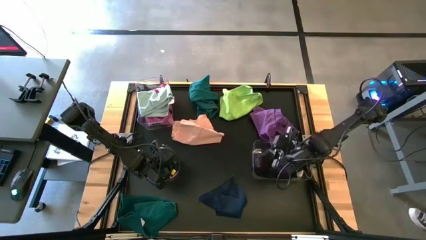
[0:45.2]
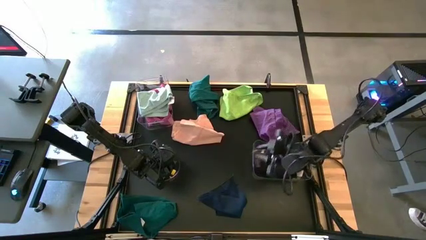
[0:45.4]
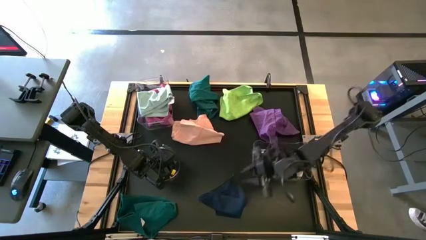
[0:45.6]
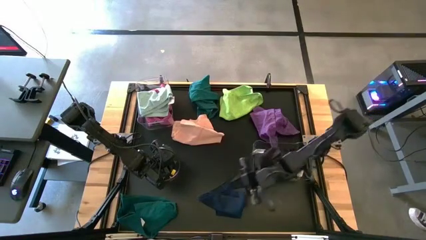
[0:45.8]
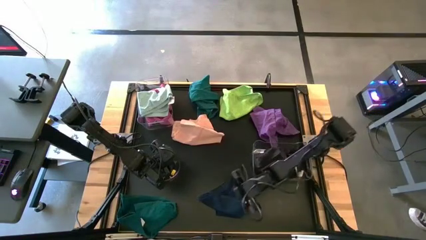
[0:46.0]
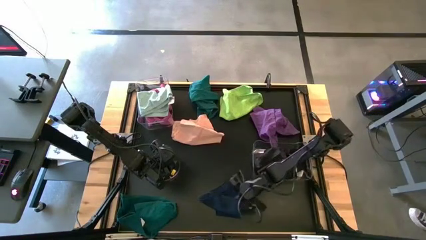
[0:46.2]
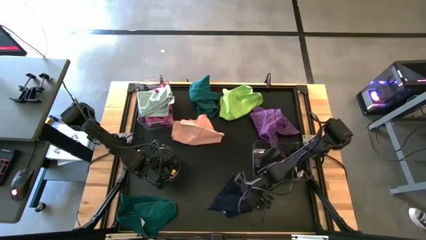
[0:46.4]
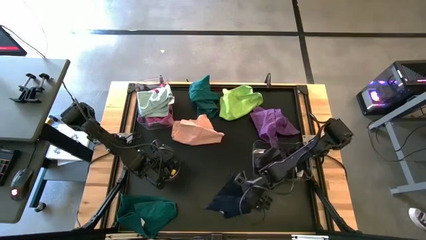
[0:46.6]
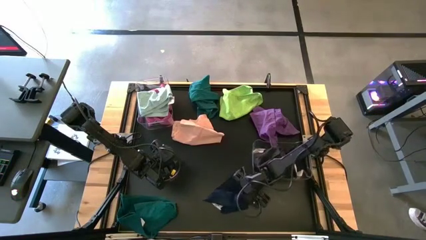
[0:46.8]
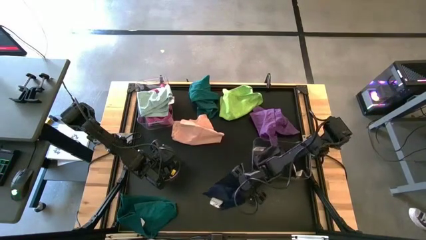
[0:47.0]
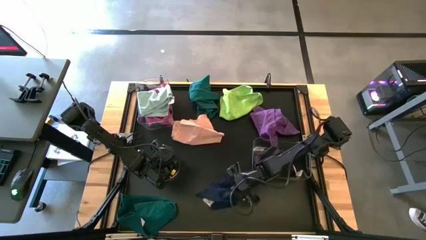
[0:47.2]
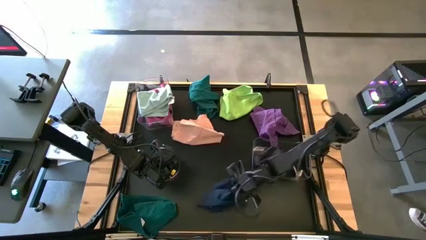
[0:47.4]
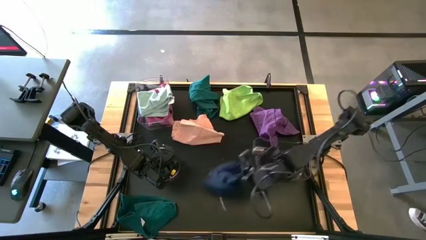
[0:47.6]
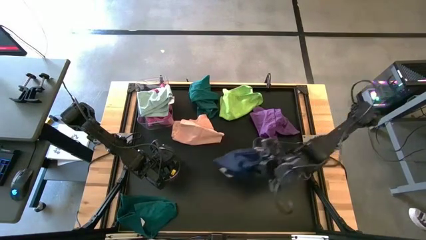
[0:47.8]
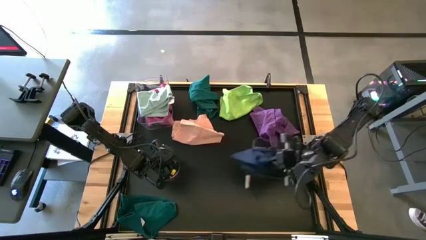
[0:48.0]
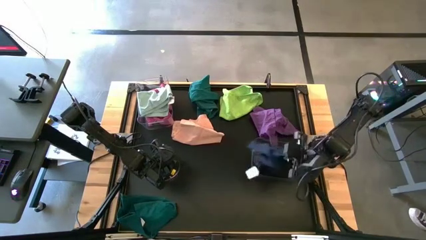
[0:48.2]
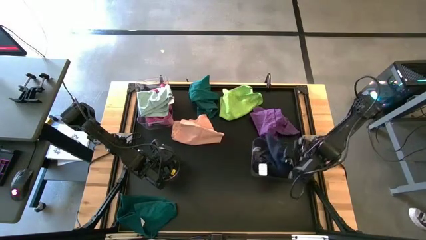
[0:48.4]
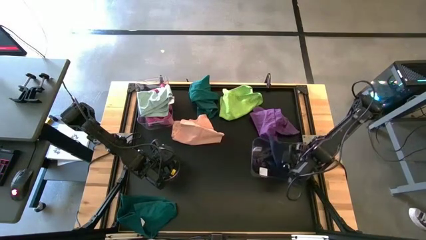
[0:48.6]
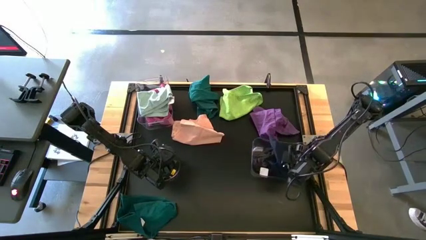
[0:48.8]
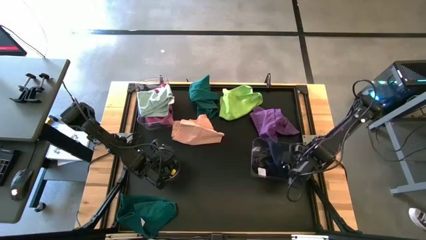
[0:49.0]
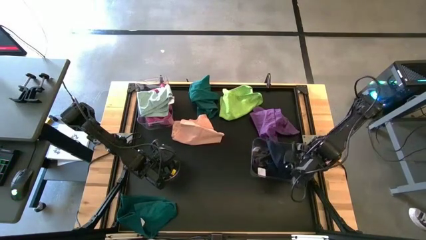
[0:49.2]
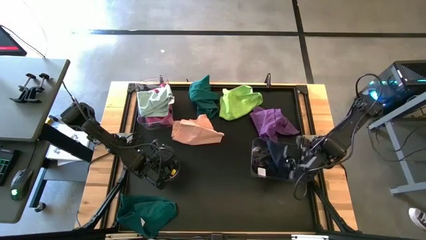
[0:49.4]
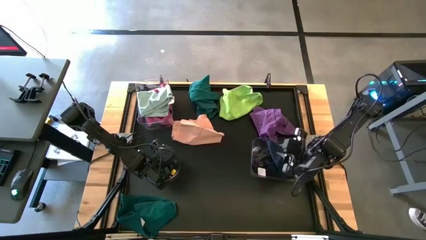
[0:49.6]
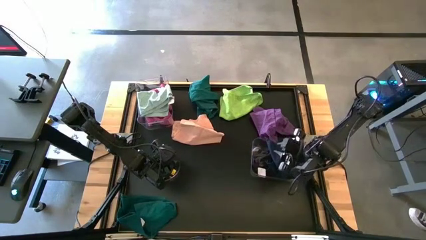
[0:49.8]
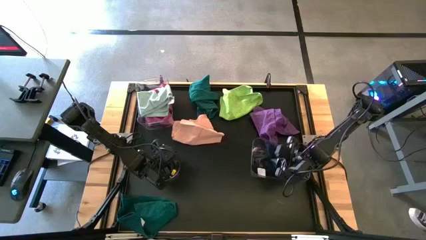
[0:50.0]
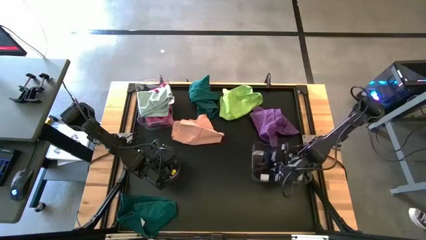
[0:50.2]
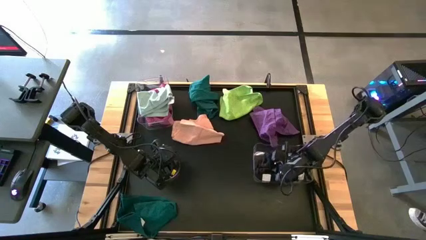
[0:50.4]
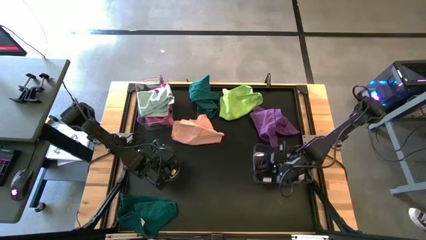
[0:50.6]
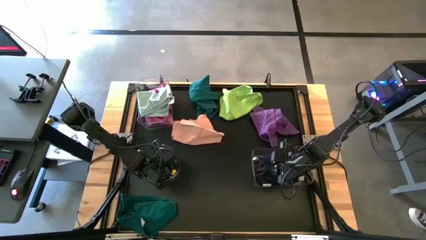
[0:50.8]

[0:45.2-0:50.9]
Task: Sort towels by color in basket
Put the blue towel into the right transparent bin

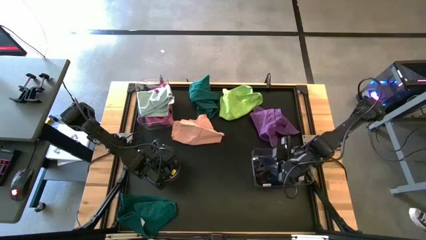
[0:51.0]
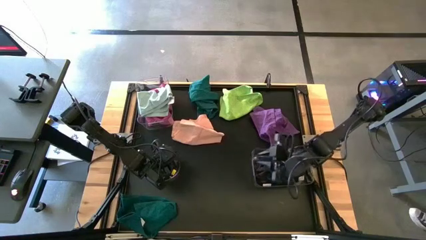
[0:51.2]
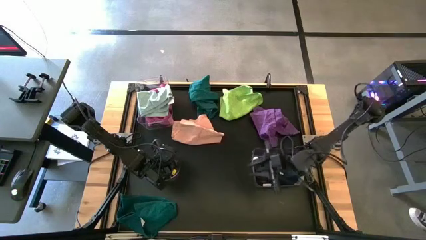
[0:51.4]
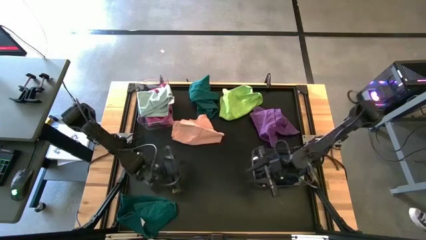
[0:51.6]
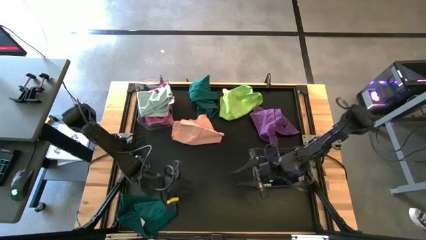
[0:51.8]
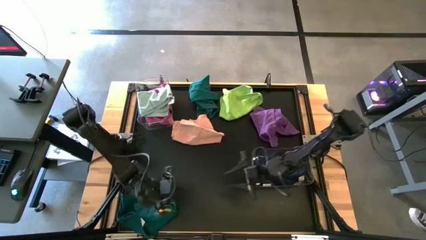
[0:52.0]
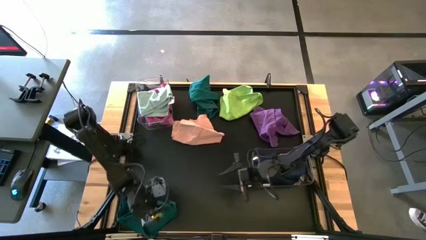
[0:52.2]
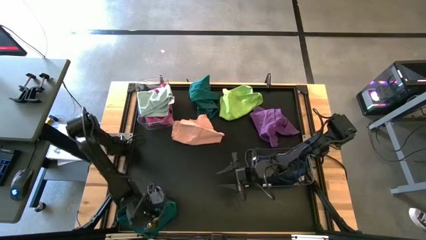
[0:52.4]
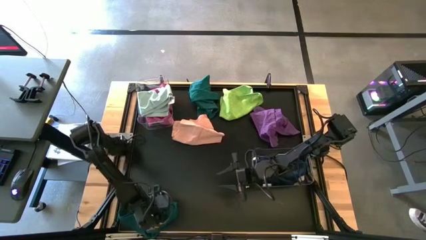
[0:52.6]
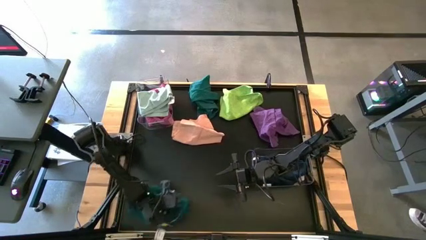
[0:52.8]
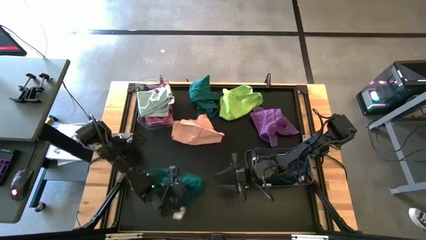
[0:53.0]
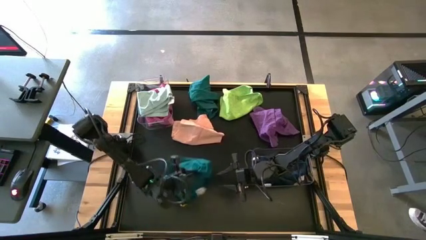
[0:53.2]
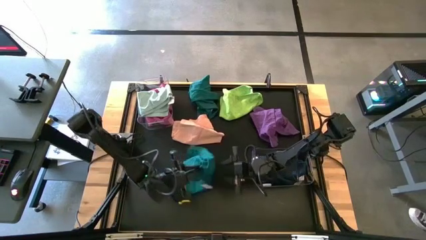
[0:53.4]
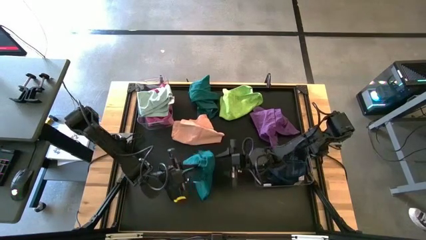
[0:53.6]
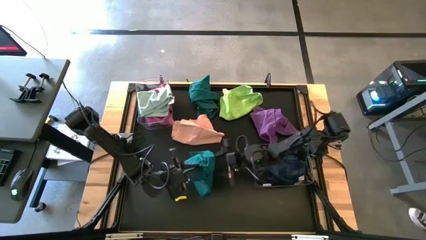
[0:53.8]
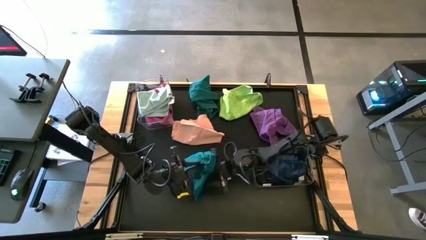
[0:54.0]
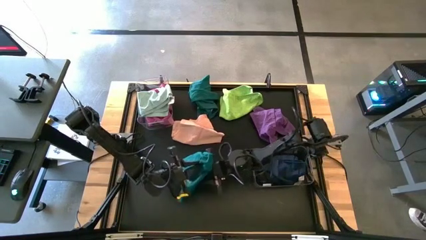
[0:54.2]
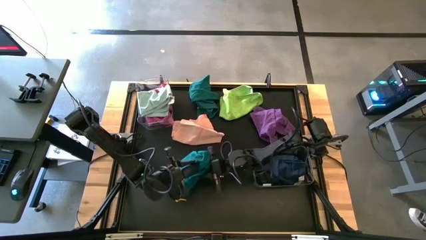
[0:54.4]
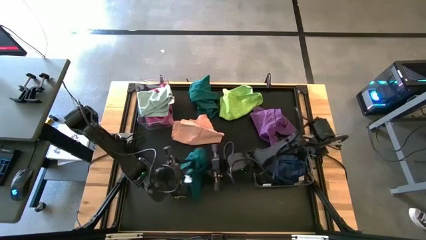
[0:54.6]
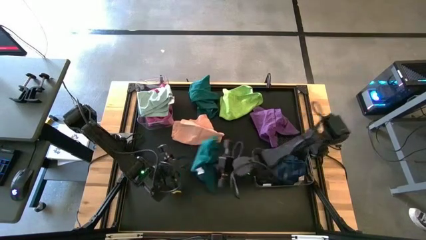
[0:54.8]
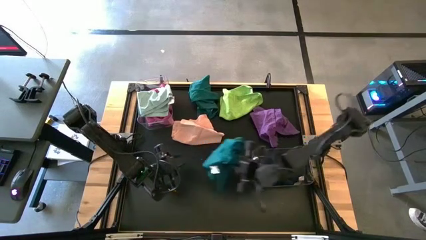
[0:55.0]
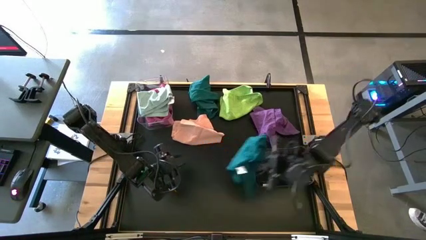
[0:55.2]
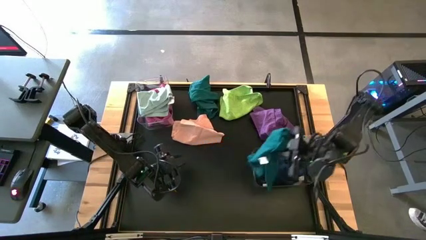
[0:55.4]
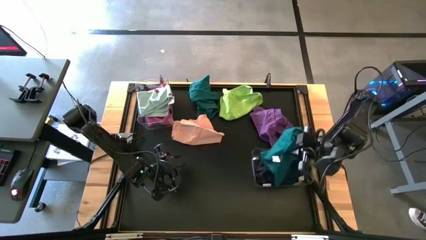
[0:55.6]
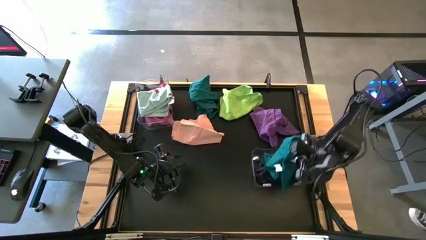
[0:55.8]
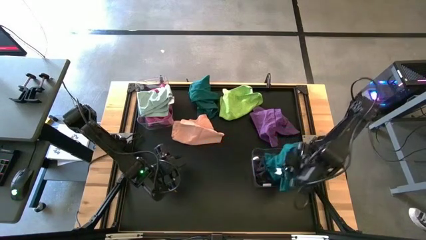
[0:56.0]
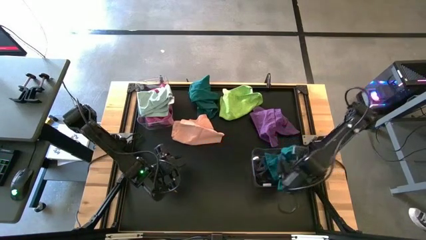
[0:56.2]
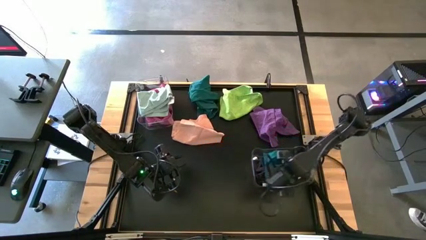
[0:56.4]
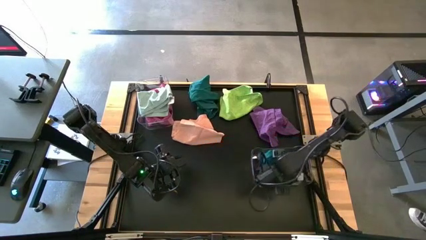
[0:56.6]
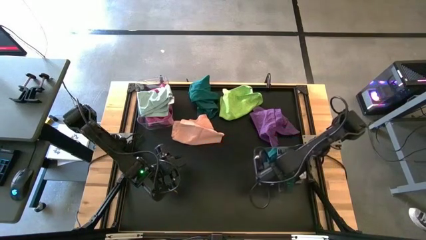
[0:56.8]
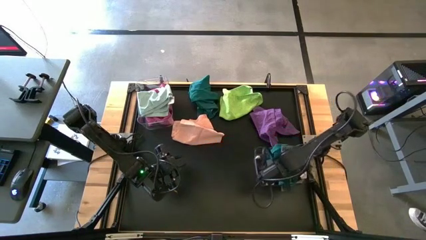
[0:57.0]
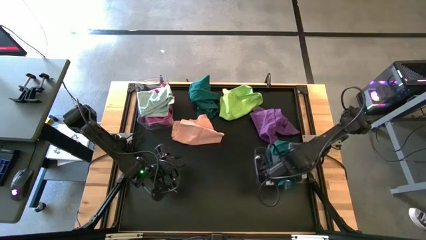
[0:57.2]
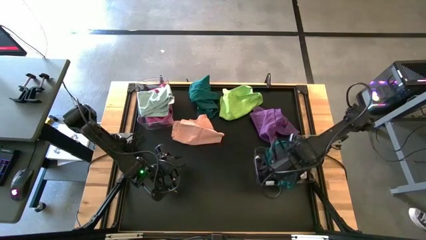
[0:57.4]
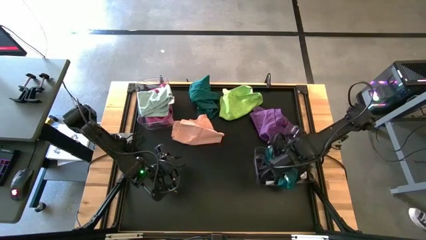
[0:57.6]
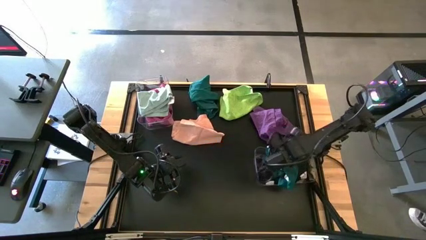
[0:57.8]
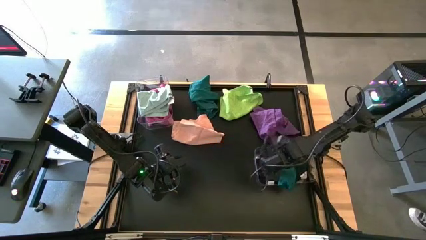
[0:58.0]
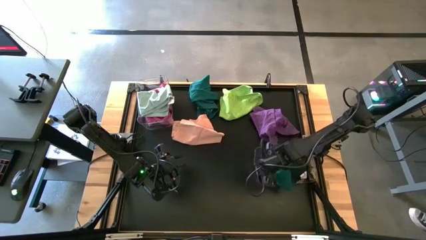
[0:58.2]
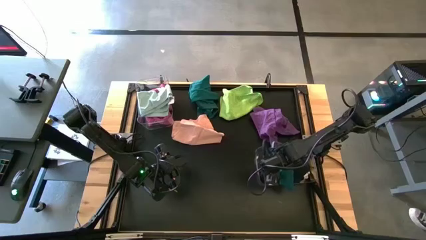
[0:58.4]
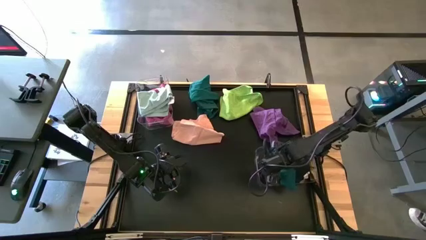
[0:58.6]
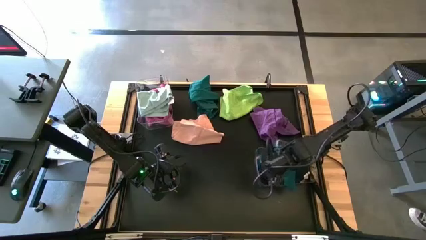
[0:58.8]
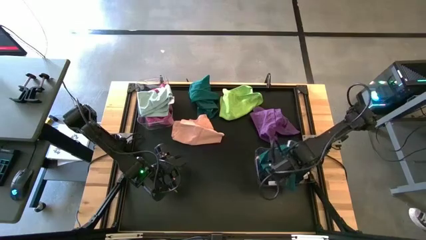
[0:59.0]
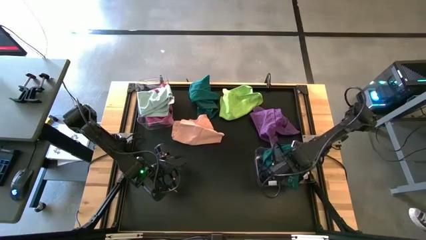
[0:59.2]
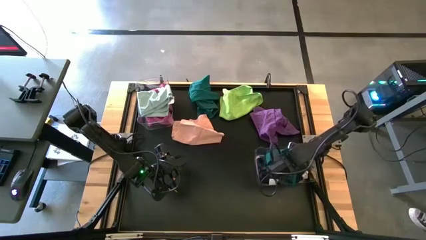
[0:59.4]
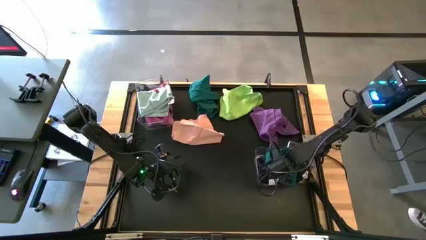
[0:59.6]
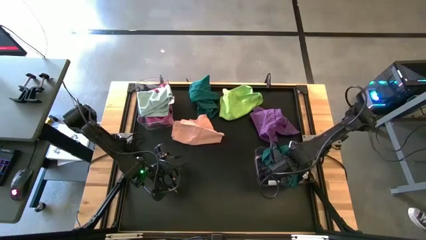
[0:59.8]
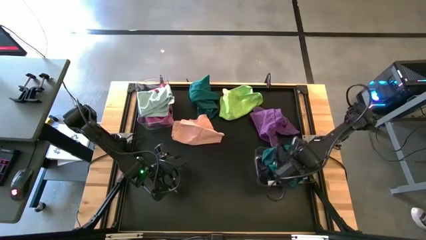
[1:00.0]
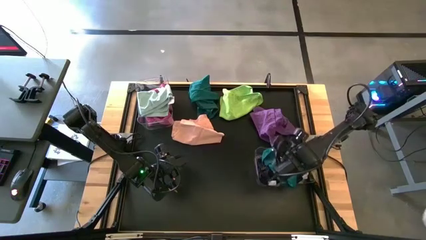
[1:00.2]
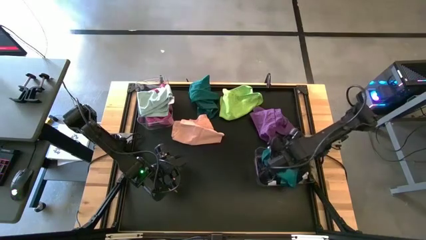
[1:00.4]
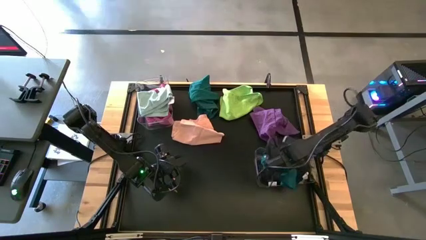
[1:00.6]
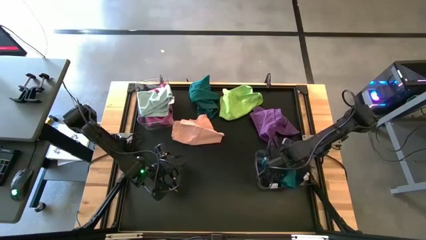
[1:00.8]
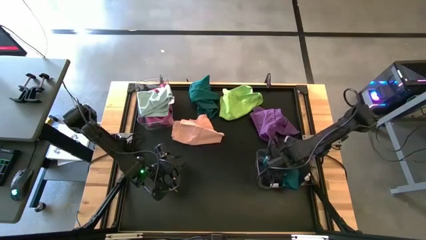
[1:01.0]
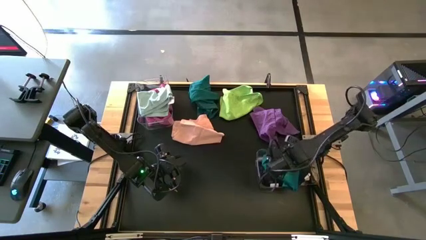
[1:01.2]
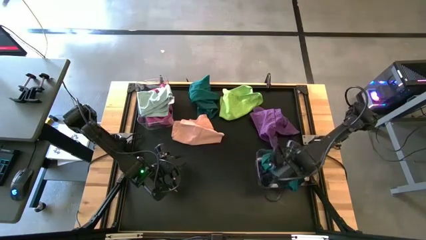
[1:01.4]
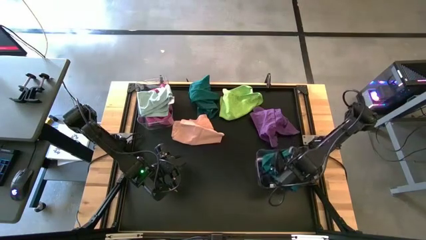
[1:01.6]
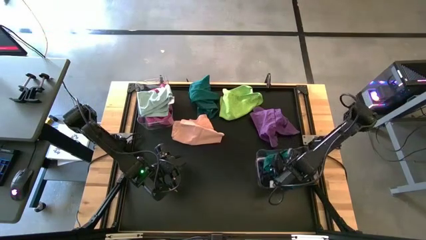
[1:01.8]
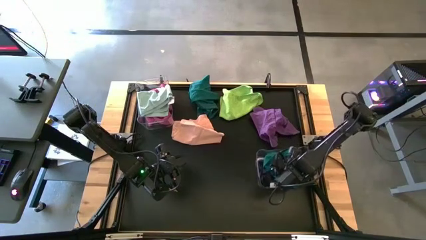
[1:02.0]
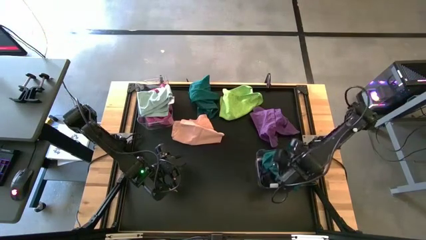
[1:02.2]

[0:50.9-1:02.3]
Put the green towel into the right transparent bin
